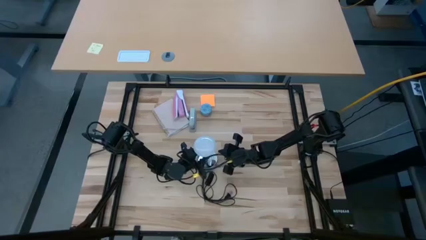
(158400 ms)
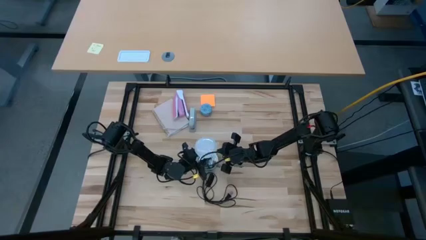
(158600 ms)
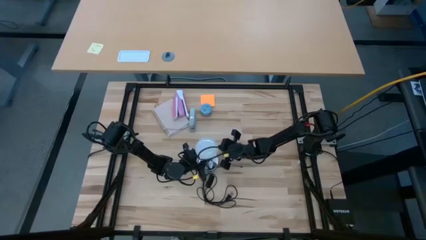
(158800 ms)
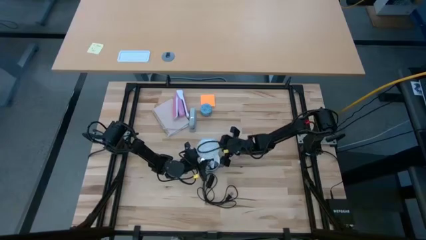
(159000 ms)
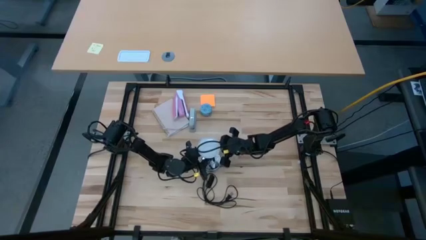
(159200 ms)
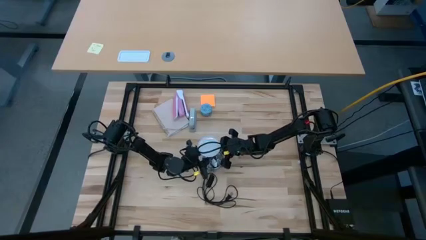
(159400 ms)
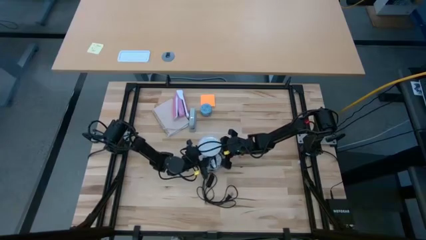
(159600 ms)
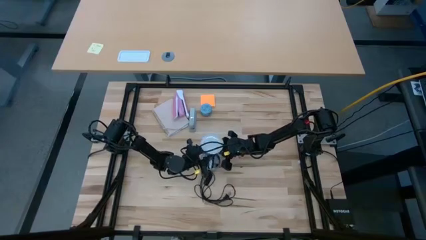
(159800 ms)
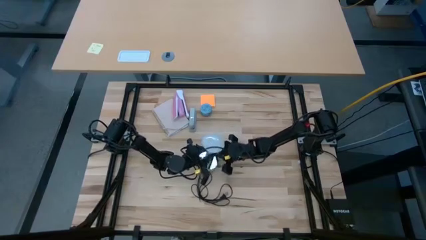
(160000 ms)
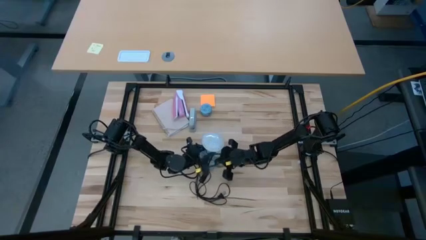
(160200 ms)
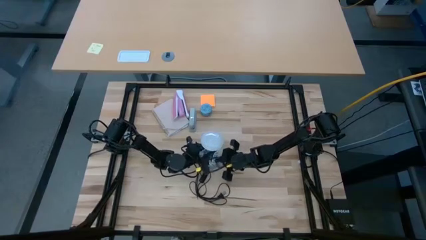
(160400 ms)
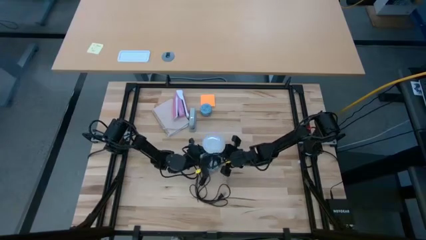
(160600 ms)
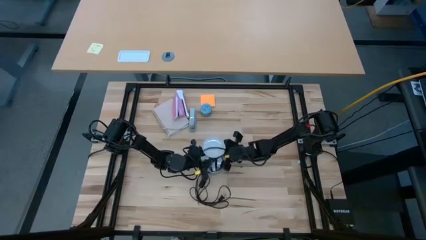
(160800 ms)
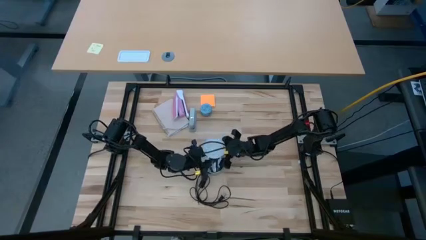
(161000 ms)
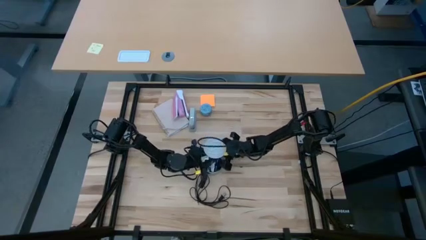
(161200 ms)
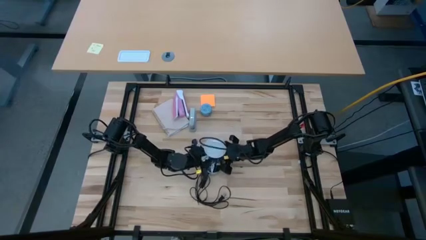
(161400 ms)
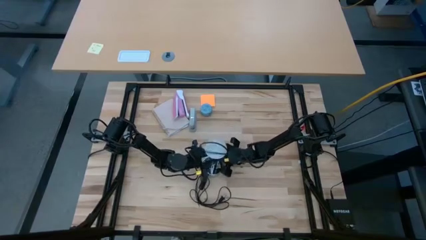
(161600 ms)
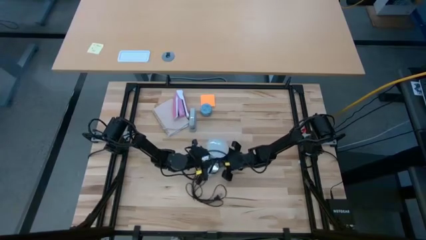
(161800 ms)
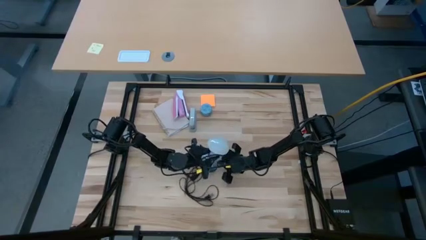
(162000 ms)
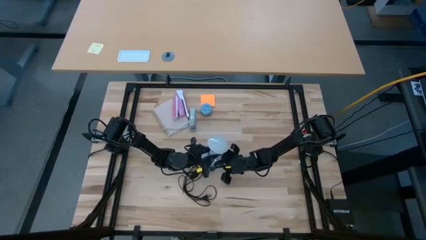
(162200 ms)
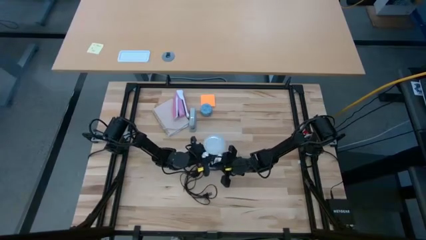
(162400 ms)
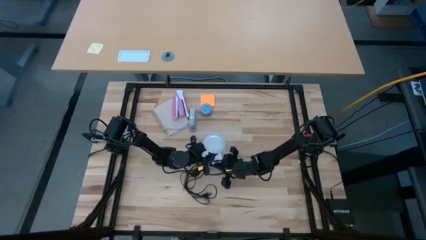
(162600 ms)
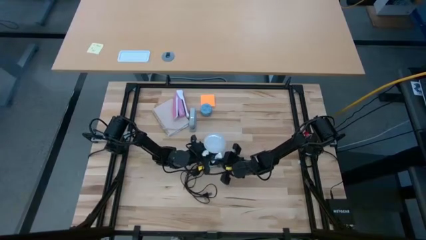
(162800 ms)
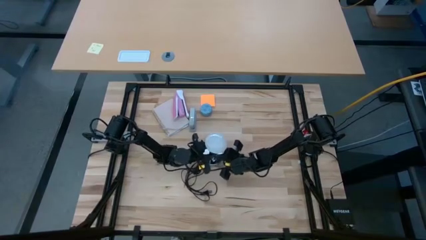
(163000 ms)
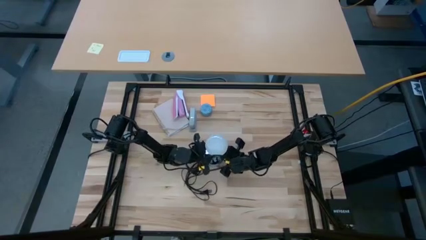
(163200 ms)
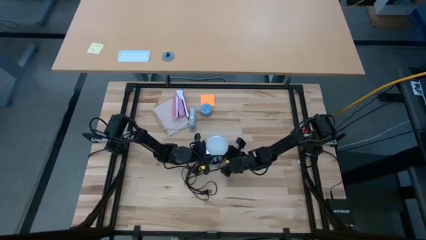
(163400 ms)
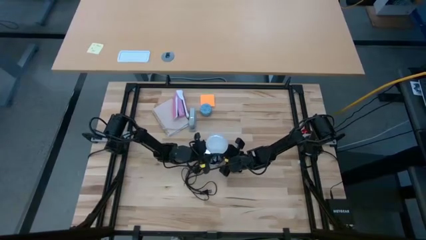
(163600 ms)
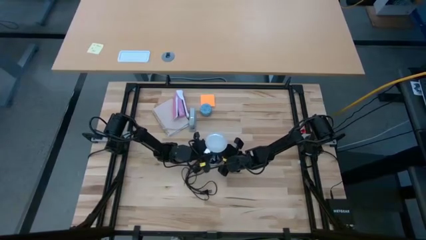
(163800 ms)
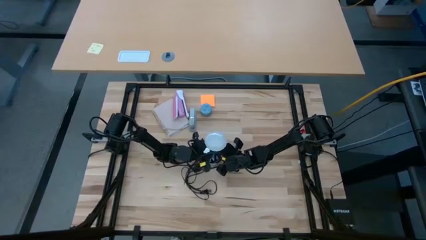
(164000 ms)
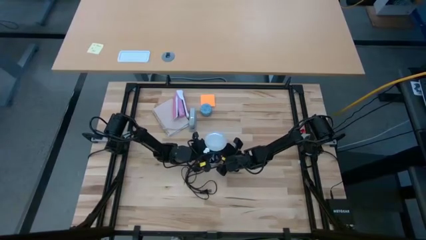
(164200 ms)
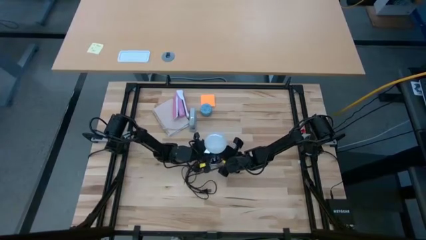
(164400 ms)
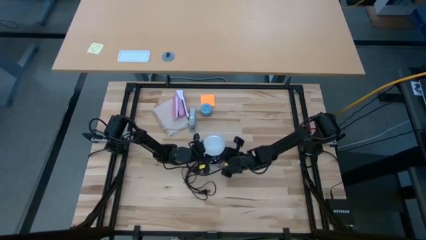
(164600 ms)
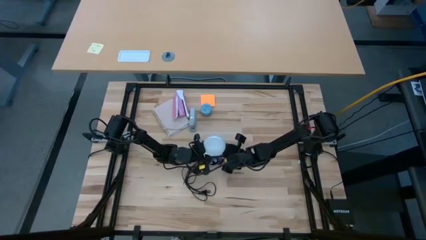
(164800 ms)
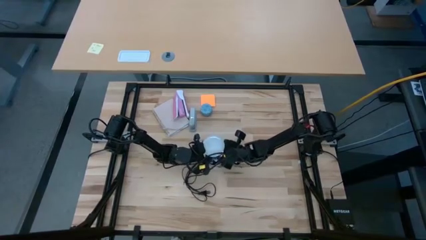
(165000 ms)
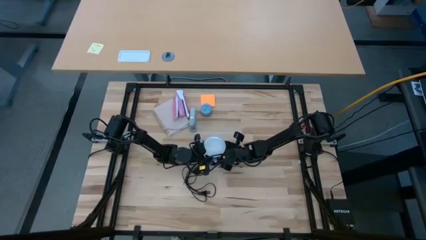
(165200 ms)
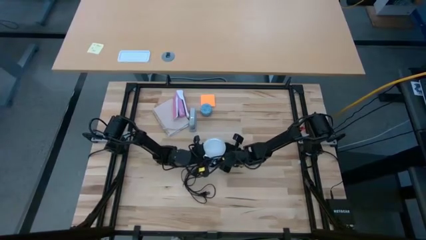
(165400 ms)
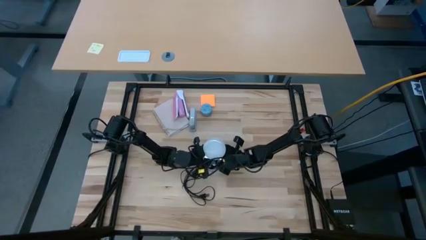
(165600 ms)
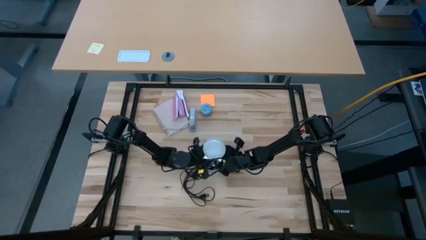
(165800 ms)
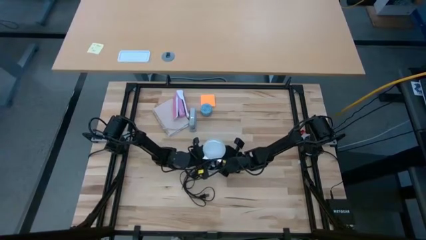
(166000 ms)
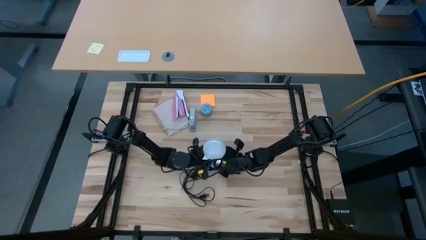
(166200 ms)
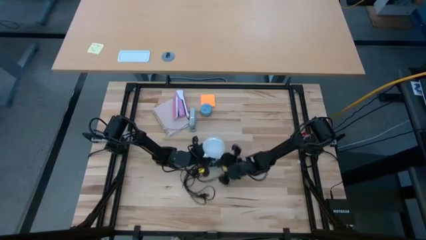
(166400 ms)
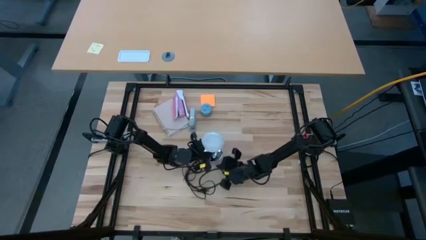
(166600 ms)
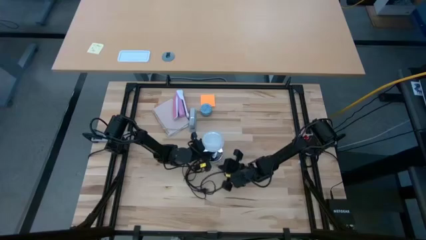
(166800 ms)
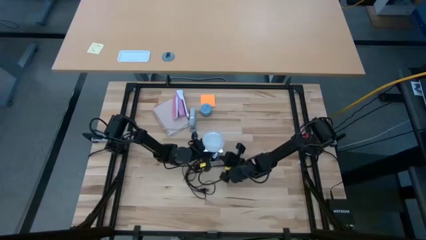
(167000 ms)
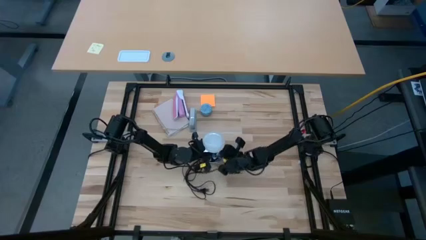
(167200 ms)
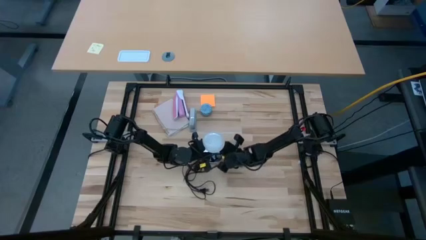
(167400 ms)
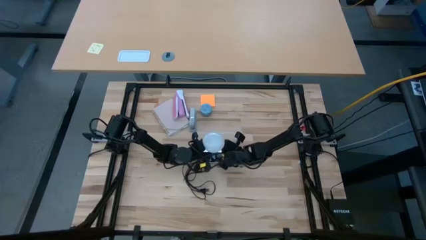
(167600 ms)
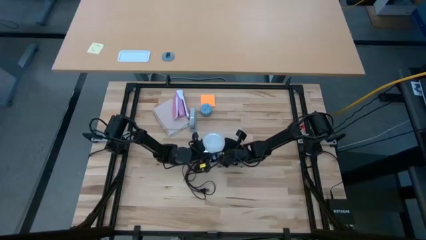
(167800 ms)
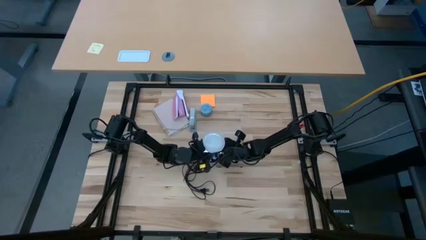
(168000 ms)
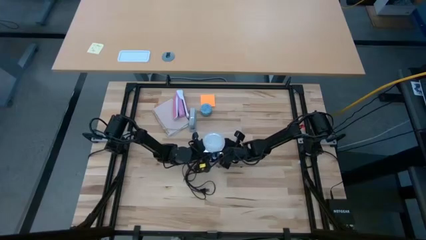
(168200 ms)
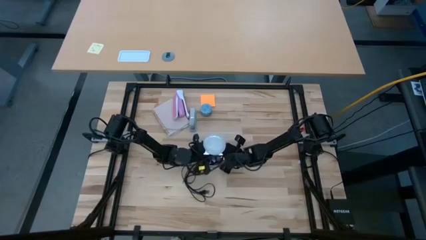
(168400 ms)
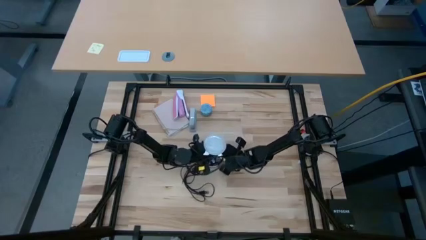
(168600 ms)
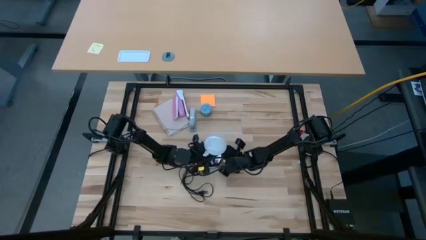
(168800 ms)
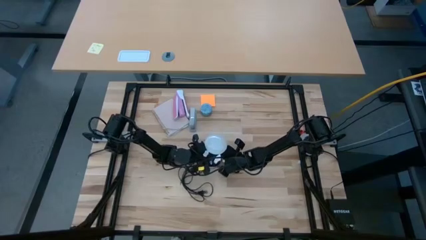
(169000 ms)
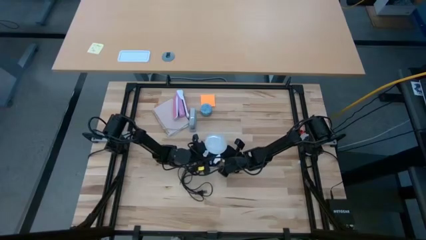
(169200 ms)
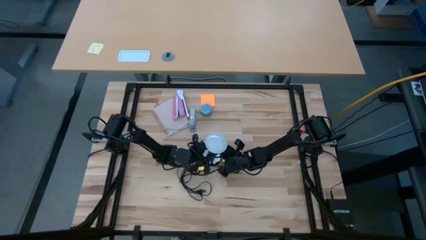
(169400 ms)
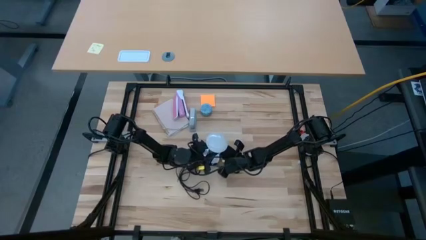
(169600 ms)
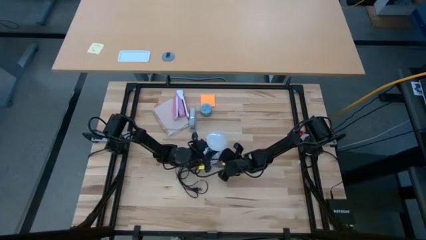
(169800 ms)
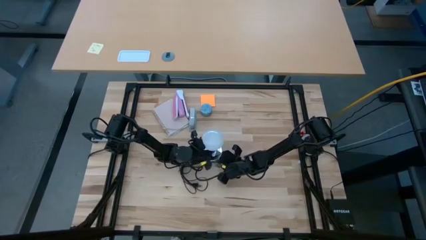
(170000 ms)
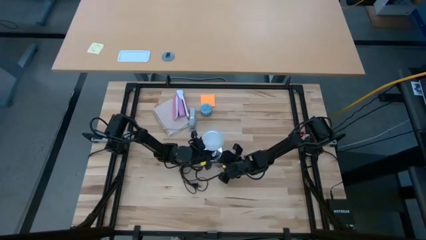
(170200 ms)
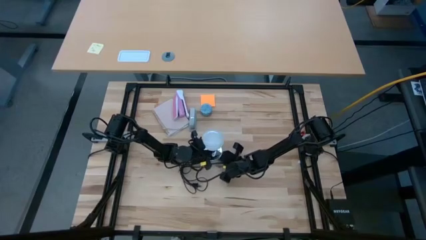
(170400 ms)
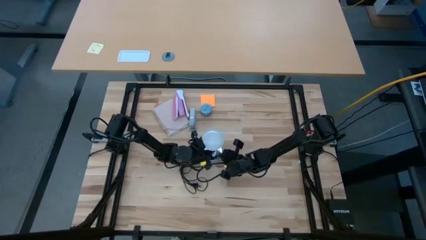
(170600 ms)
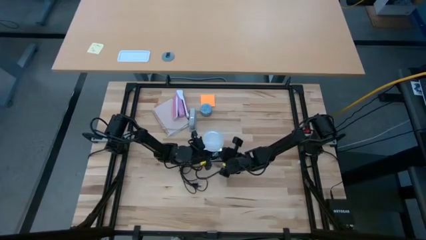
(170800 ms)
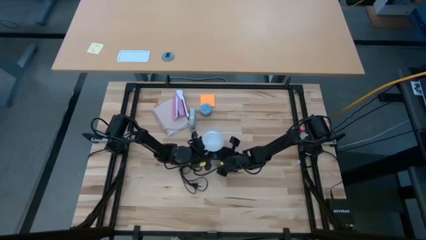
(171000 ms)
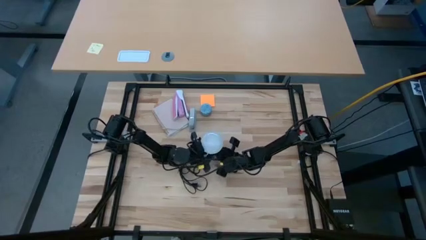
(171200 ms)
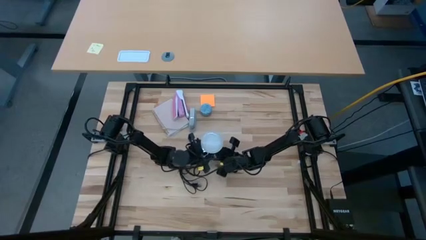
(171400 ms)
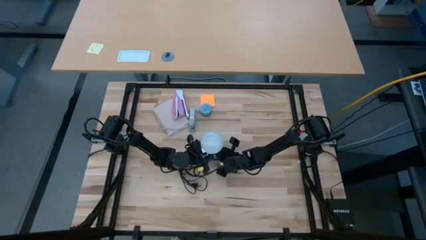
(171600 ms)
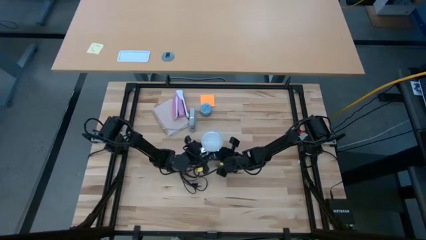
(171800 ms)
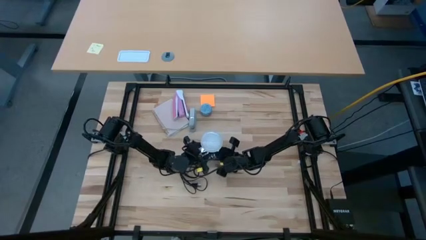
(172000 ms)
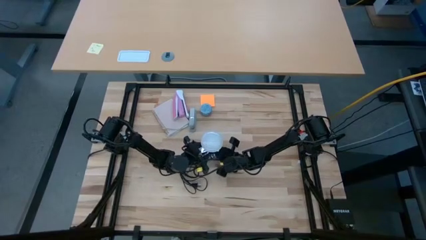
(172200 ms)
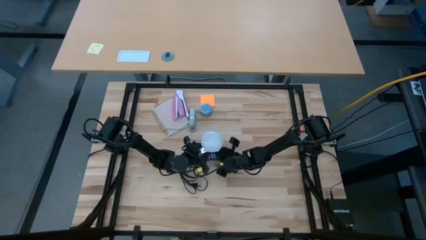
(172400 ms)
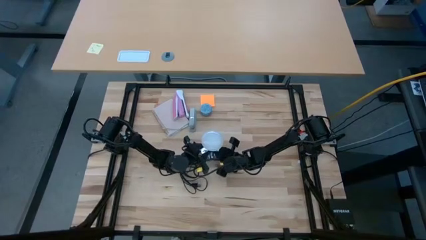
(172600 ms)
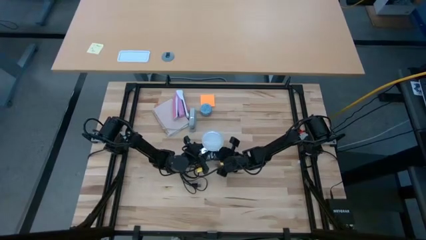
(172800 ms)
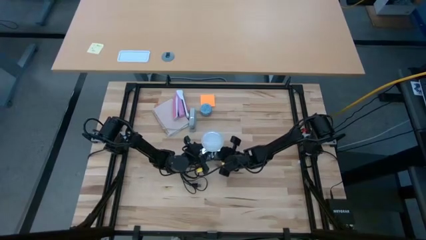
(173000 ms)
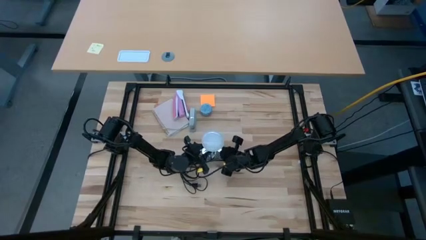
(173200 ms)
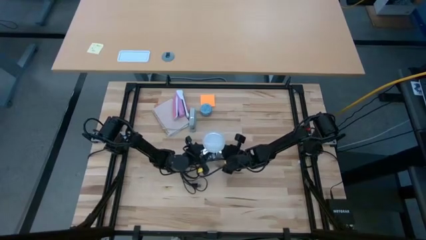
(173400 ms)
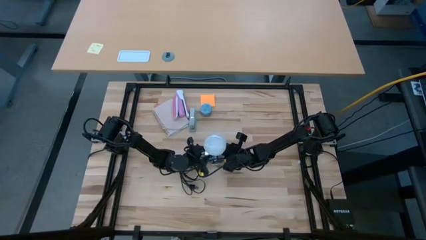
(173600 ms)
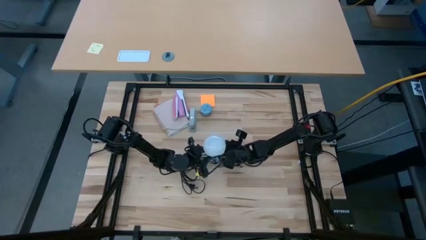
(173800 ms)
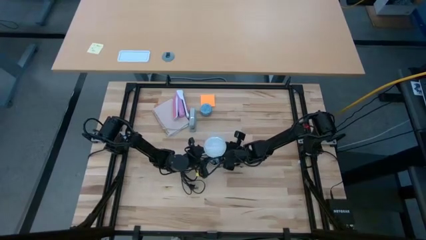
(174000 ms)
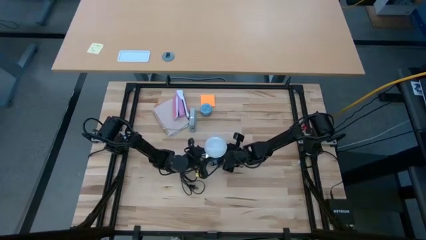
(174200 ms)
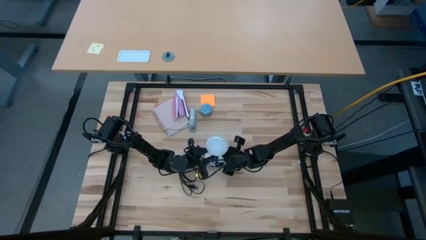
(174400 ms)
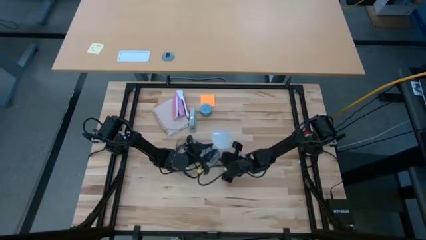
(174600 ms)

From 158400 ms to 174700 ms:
Task: Screw lightbulb
Remove the white lightbulb from the silver lamp
